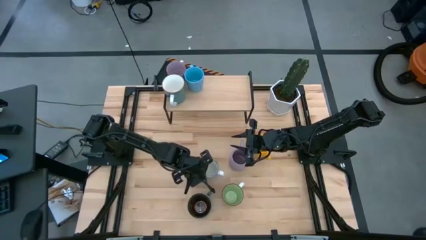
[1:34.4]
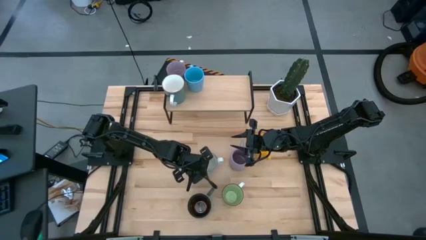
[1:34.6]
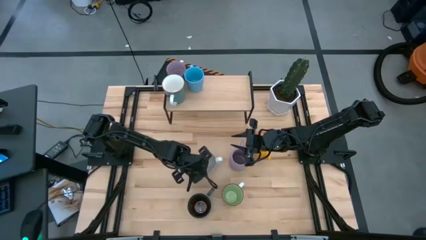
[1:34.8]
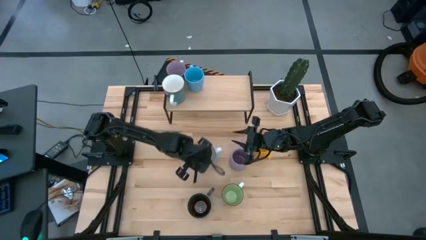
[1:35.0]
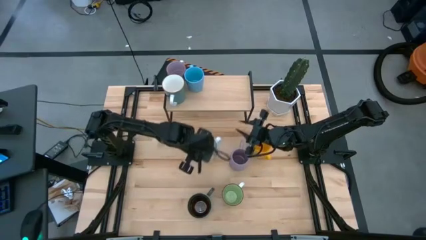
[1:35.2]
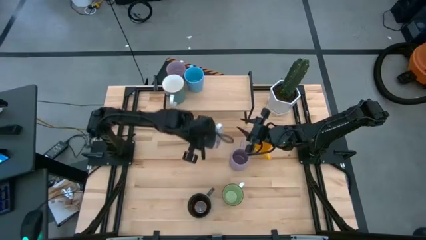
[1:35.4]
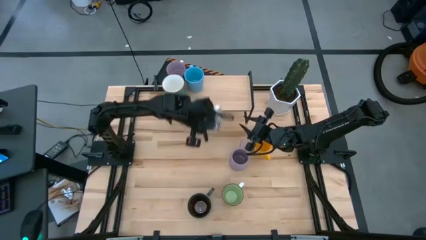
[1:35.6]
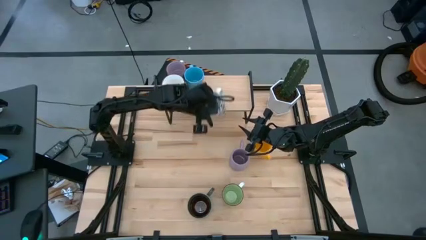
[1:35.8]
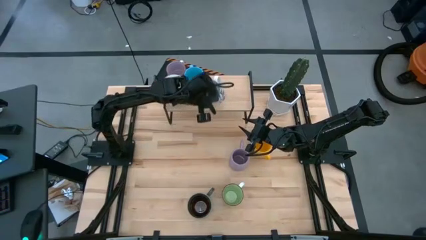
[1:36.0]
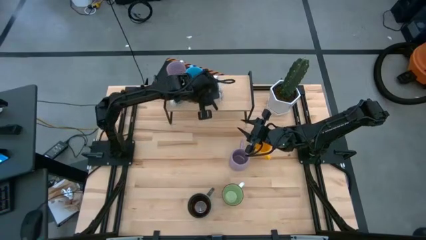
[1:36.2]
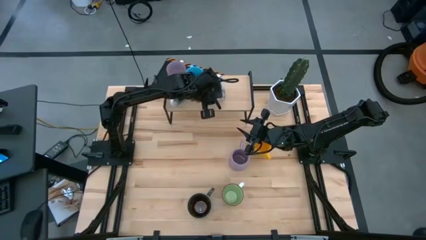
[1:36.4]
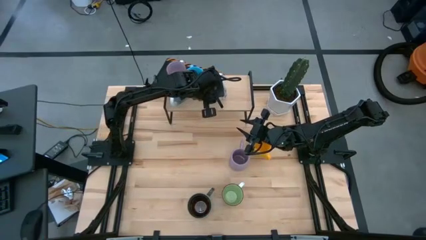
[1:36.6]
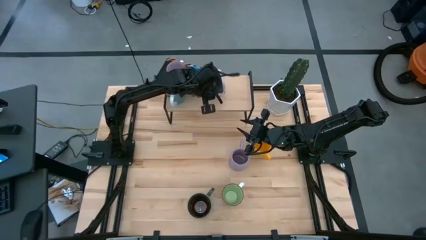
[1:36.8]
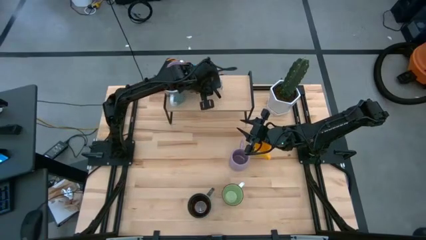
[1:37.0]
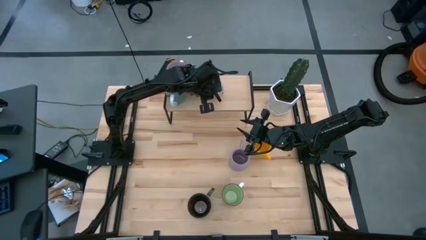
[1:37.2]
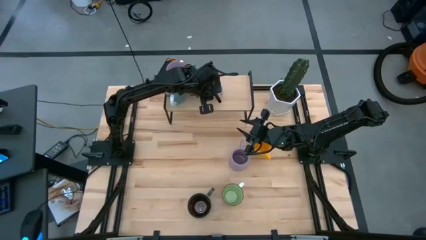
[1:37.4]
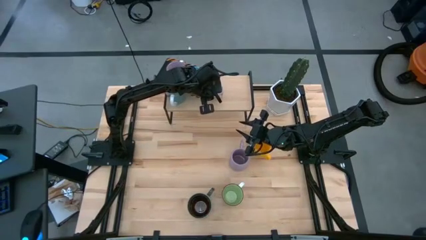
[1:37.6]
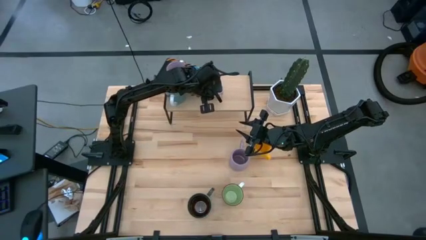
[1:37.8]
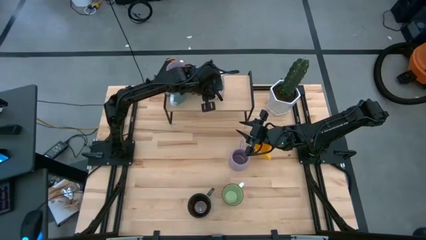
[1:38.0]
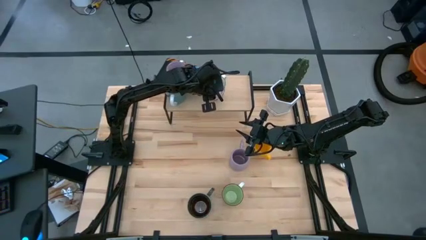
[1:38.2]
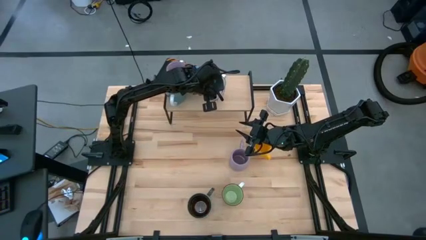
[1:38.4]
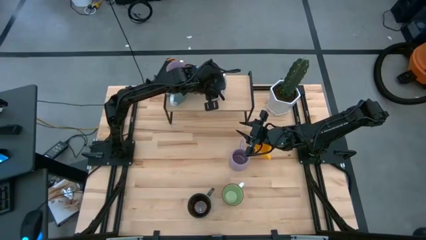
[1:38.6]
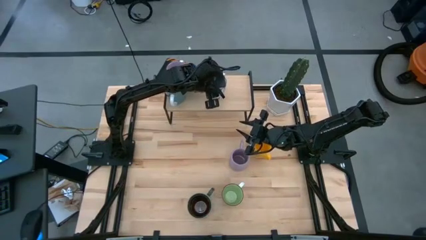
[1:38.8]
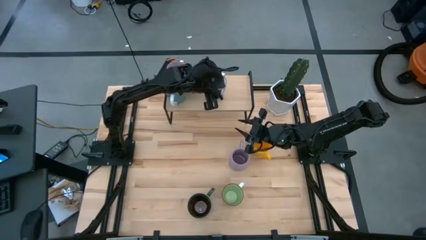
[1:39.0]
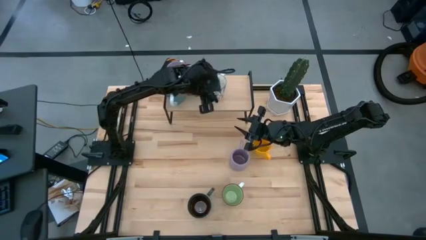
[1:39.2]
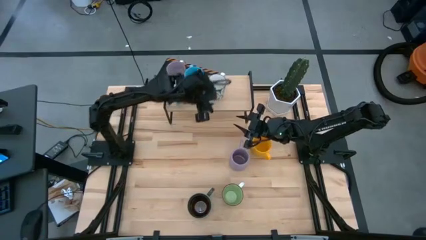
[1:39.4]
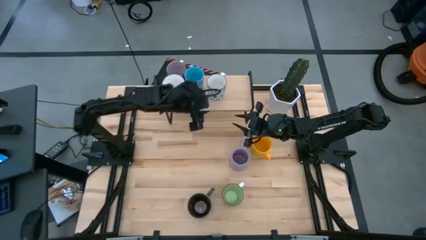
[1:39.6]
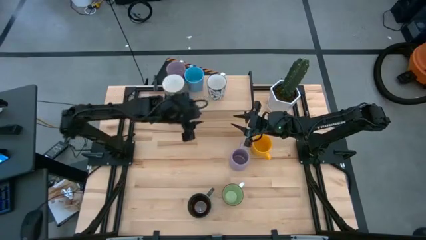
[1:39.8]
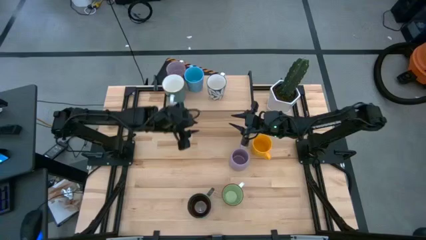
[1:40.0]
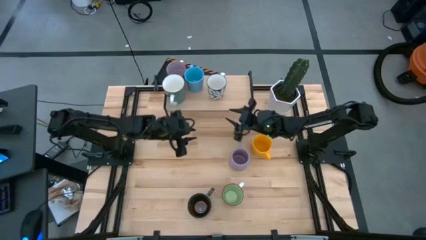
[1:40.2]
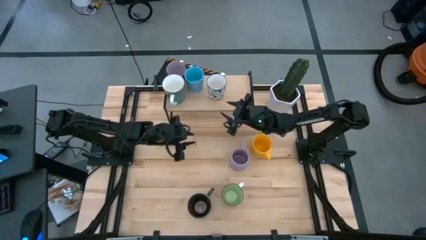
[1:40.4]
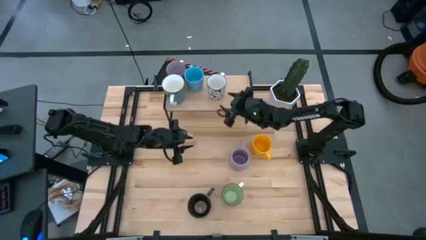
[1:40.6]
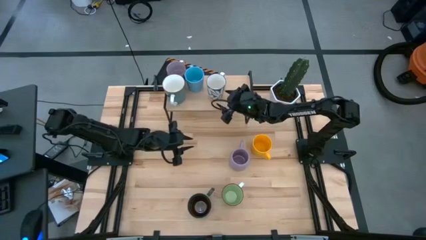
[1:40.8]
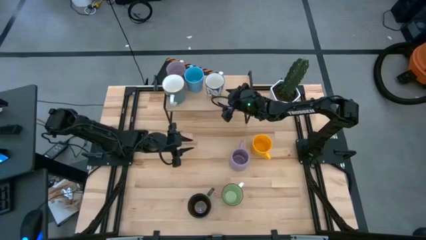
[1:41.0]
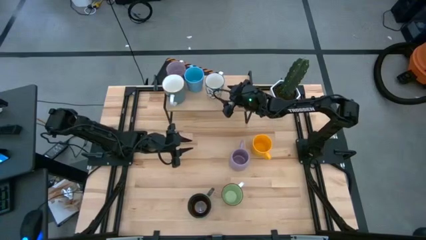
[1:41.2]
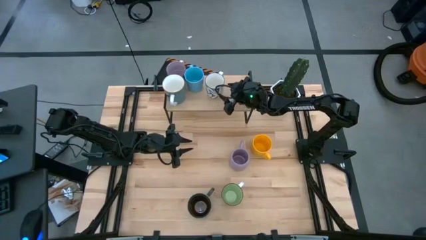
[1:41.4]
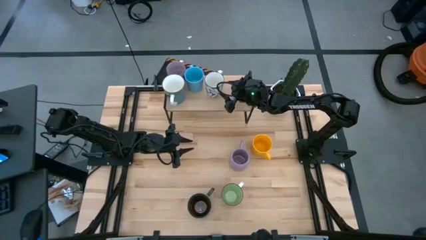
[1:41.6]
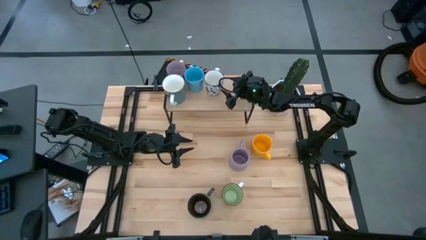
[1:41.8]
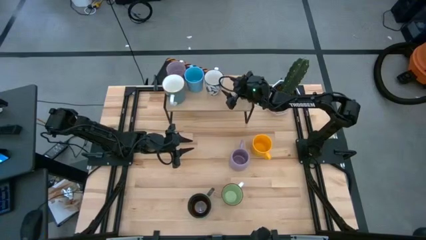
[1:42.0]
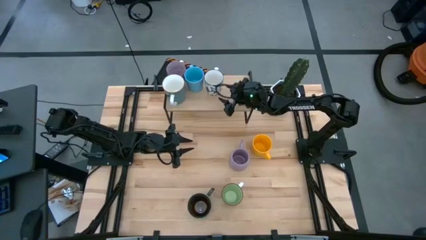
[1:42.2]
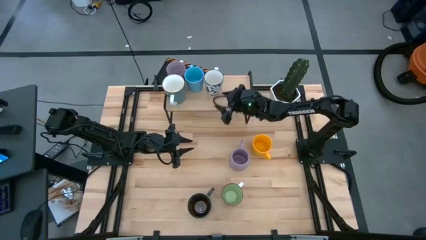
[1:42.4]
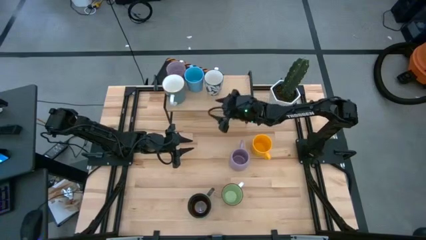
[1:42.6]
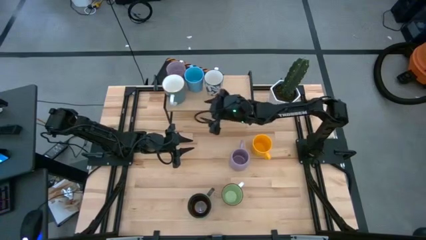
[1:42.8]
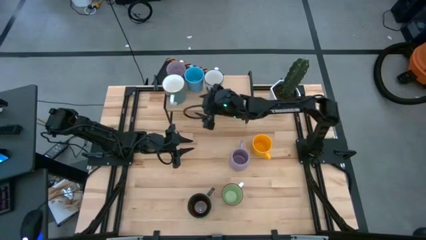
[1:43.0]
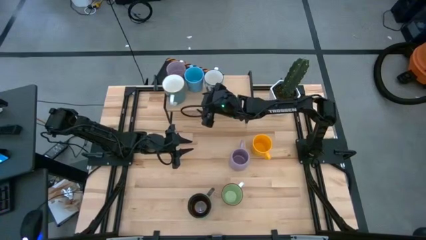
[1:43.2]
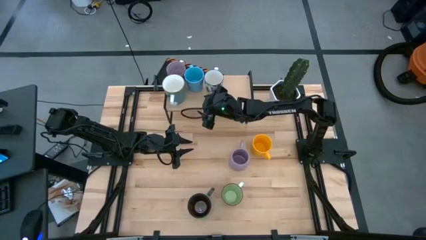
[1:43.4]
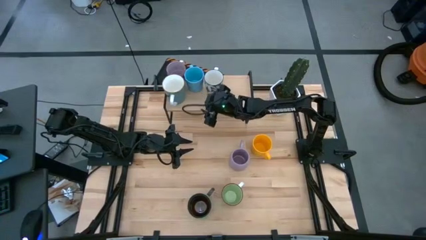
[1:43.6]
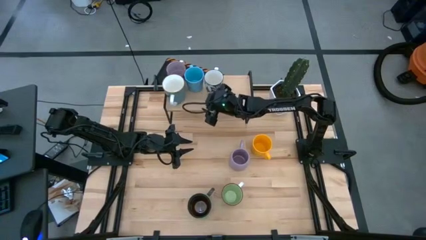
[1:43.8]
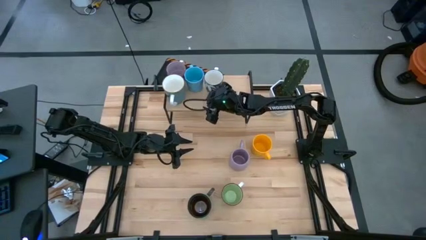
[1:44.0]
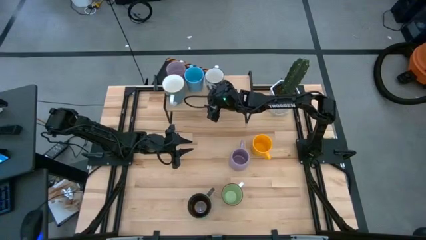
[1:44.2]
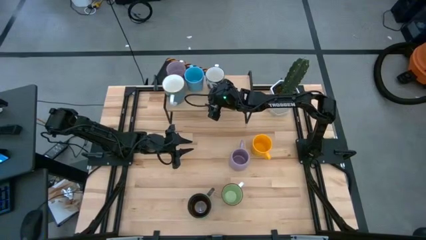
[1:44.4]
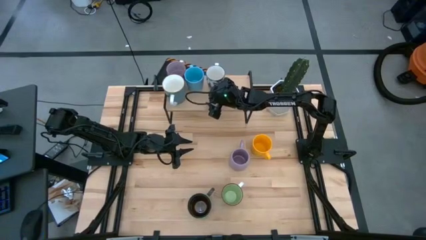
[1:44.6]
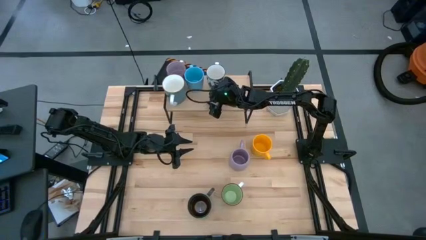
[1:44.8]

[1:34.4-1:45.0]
Task: Place coffee mugs
Put the patterned blue mug on the shelf

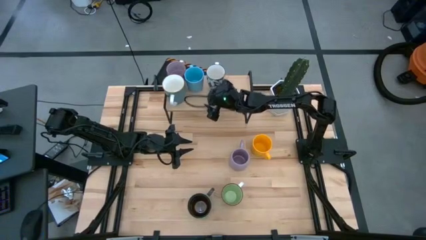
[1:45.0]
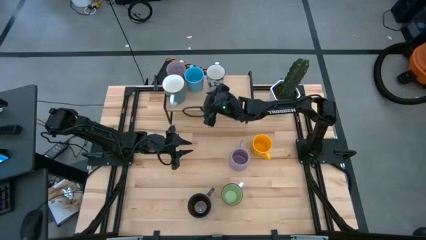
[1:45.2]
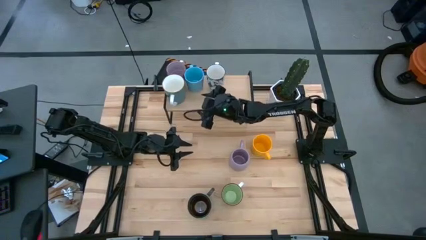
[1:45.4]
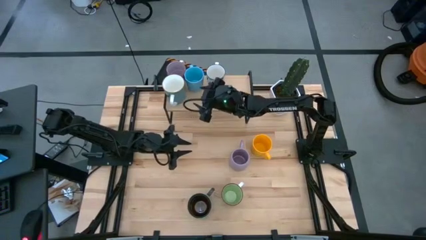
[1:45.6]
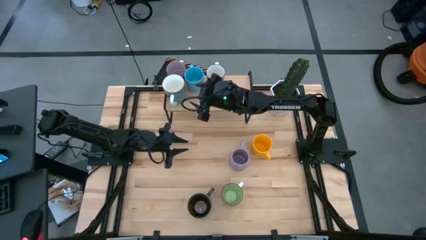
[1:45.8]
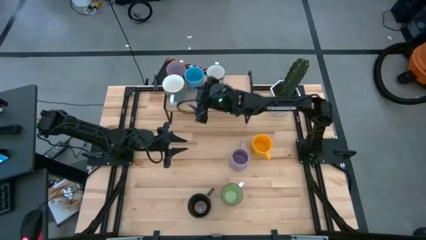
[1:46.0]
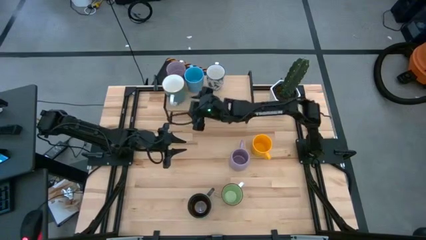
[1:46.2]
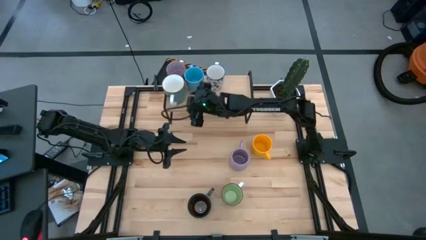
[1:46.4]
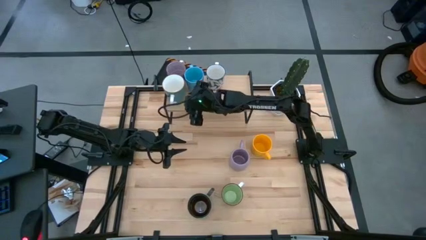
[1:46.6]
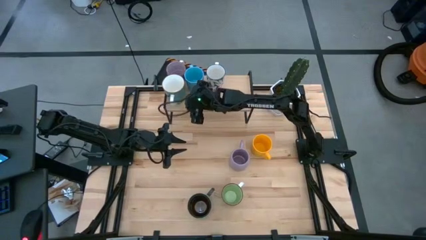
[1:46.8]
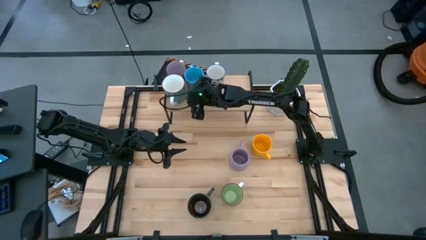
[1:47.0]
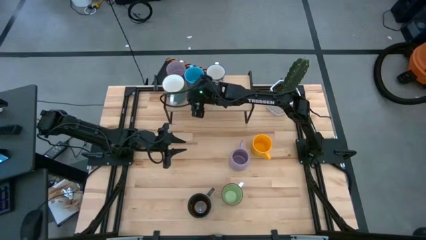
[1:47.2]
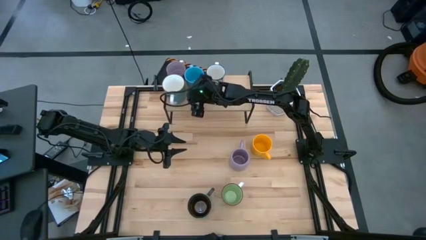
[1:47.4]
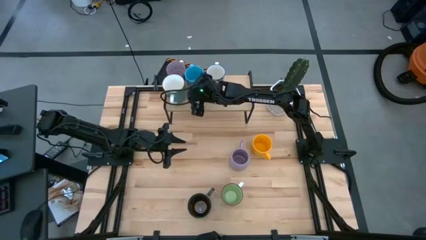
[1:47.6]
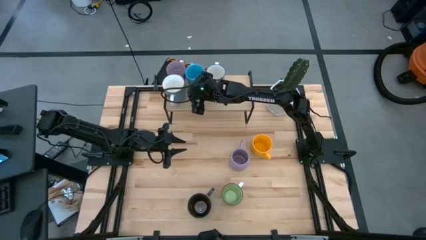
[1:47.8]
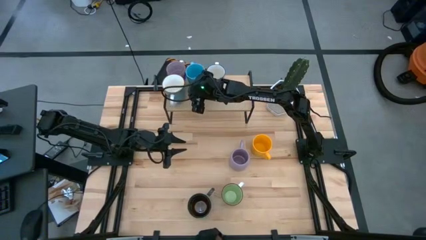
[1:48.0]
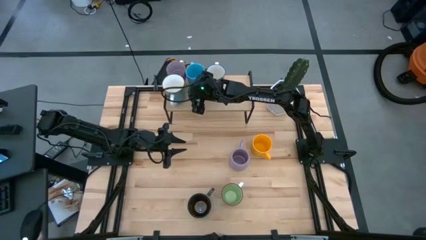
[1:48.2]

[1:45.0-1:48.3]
Adjust the blue mug
